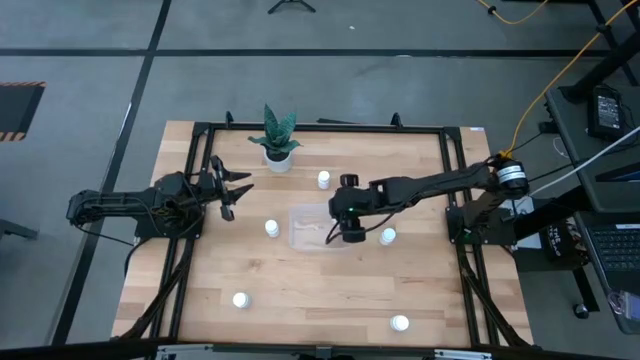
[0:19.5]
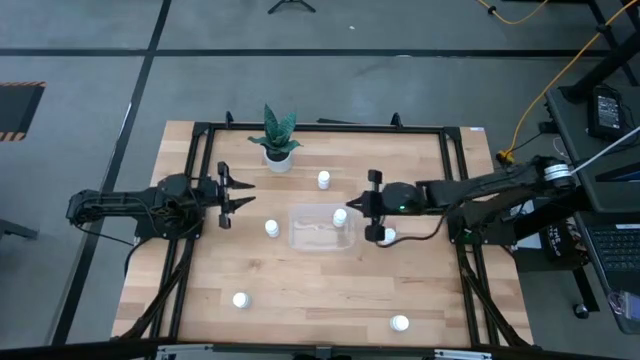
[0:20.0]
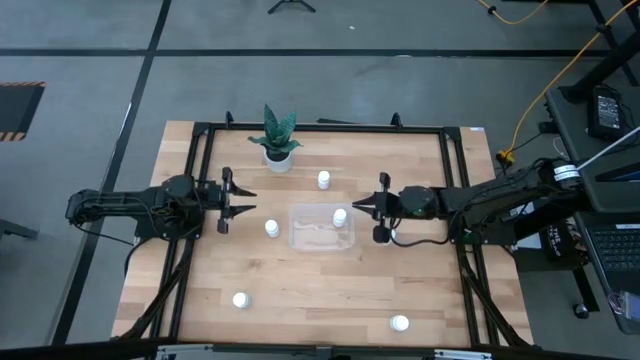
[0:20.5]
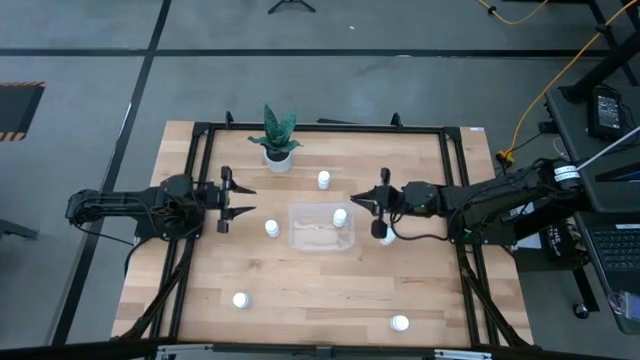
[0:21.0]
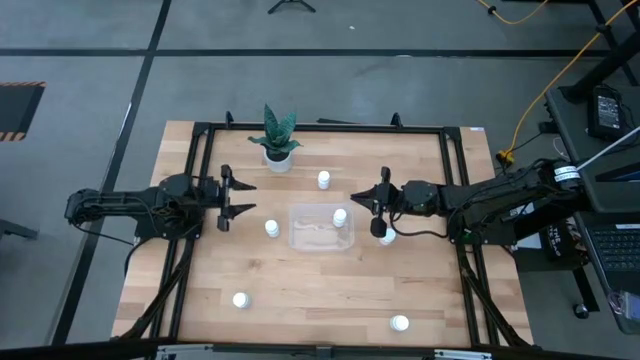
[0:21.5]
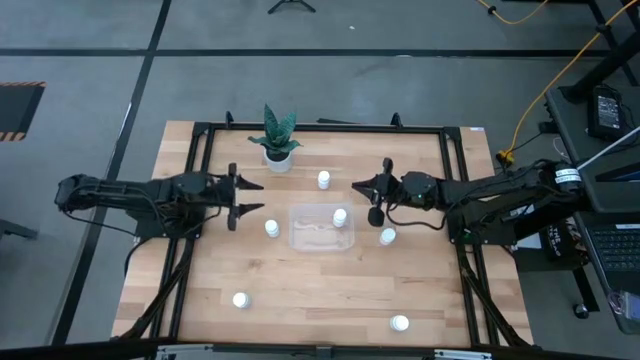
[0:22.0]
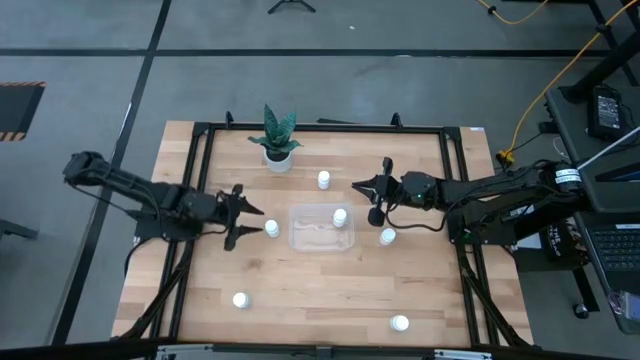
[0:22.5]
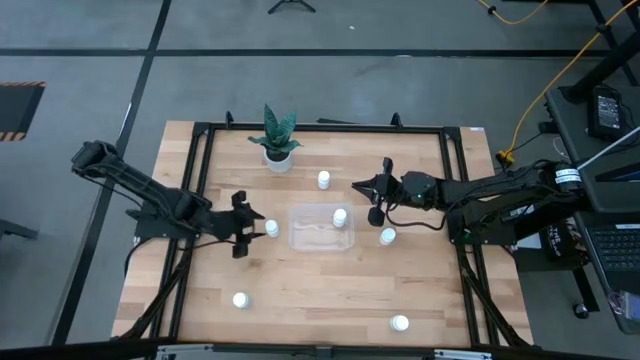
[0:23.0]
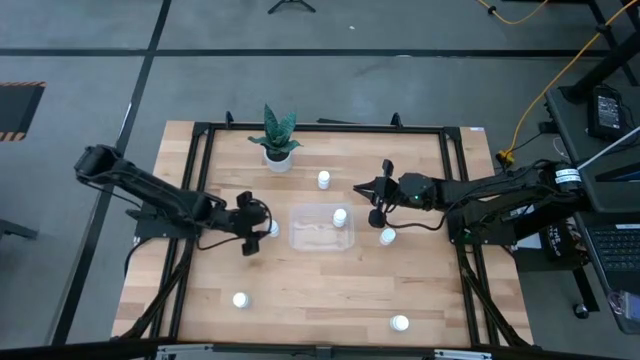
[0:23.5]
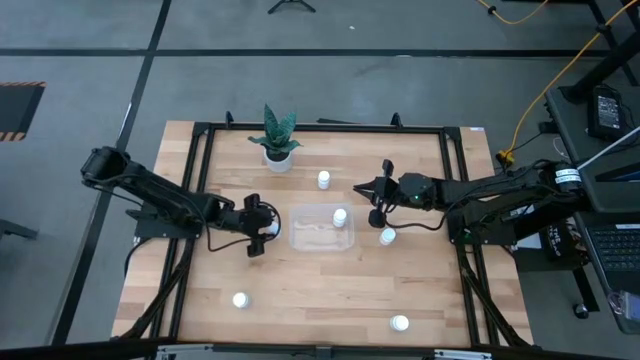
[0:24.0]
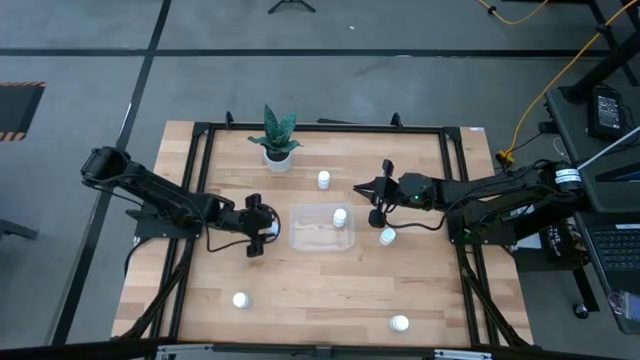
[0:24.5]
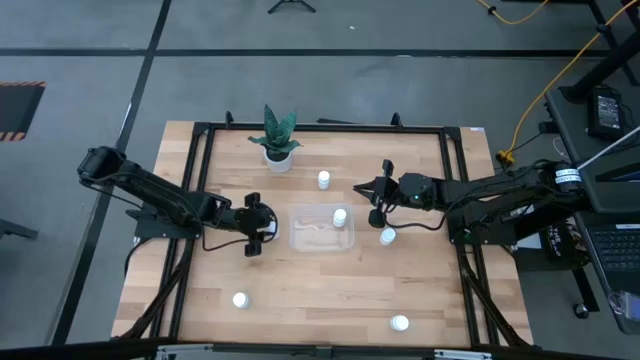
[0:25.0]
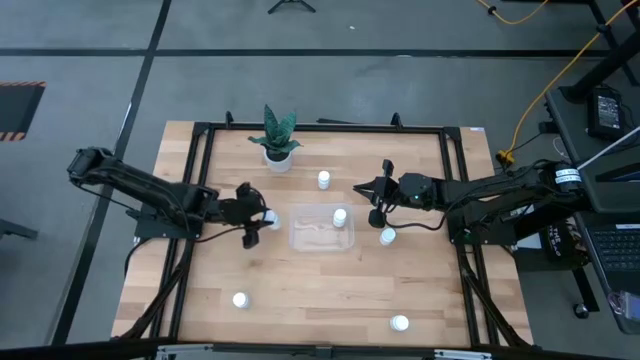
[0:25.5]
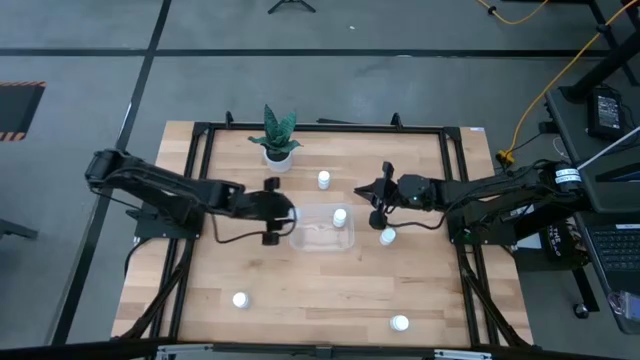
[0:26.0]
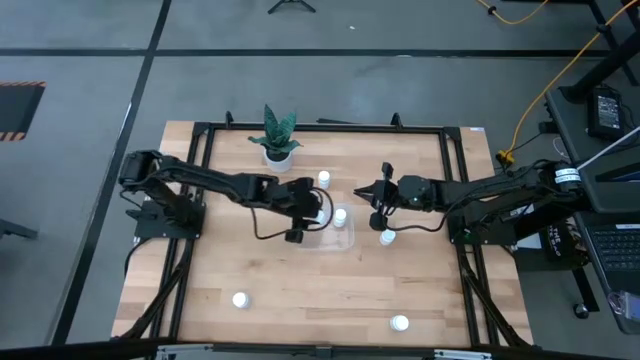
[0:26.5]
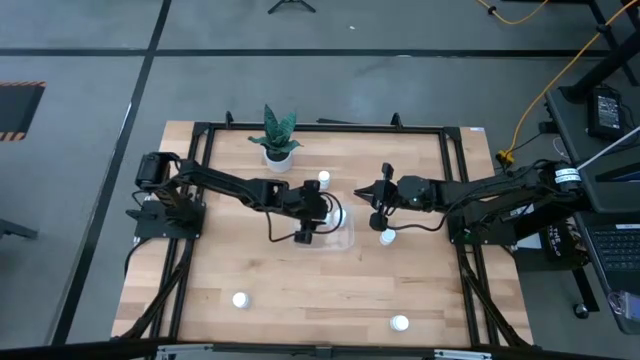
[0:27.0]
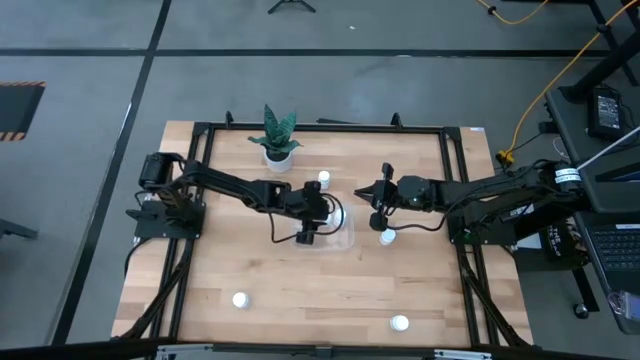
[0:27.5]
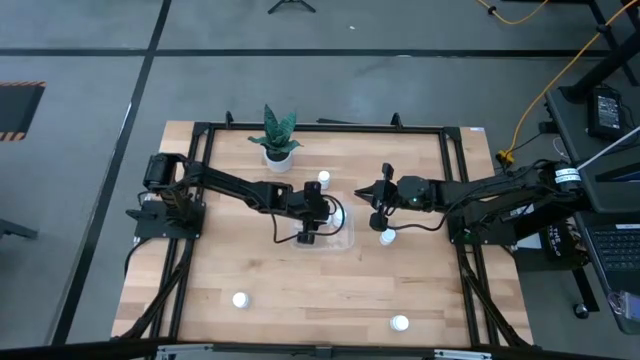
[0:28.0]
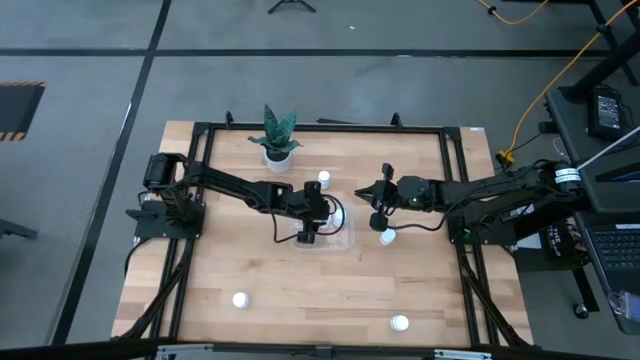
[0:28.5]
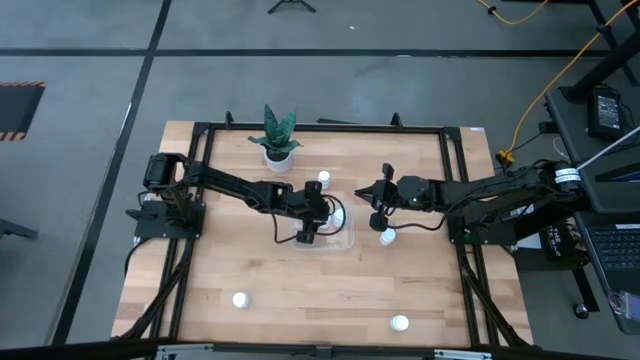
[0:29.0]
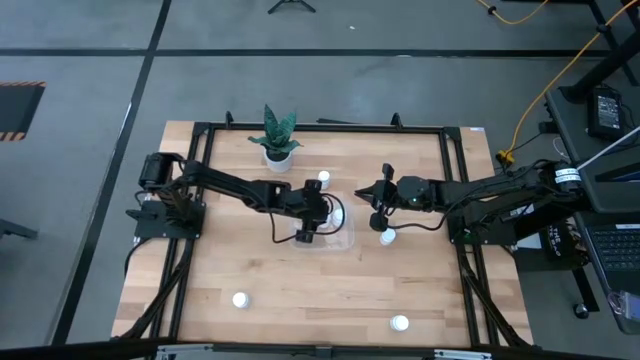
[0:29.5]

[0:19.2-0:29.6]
Task: Pick and place pill bottles into a basket
Put the white medicine bottle into the transparent bin

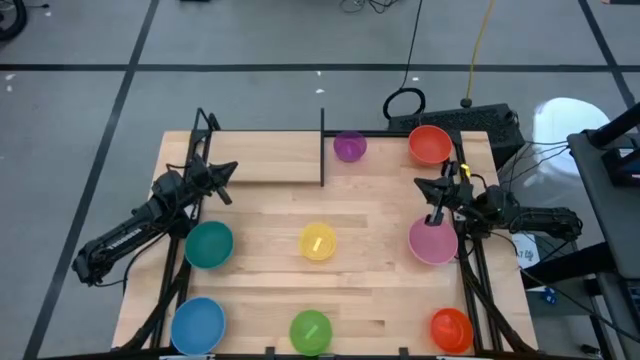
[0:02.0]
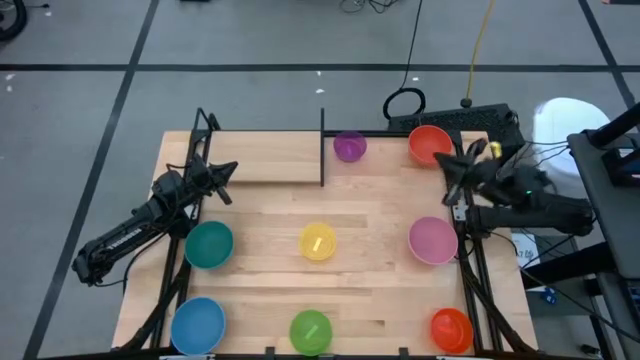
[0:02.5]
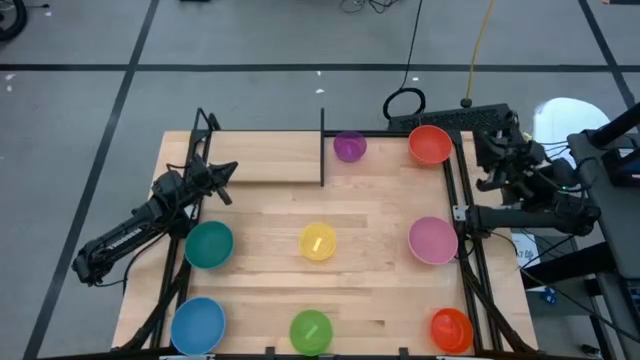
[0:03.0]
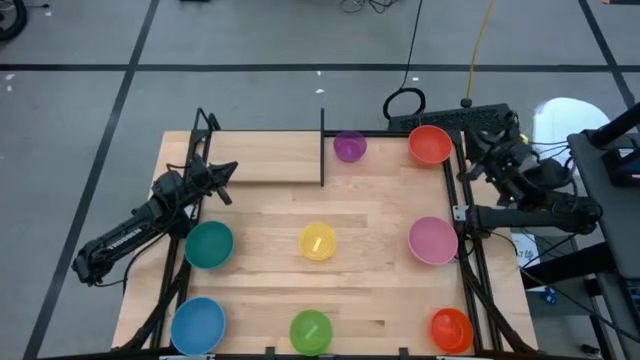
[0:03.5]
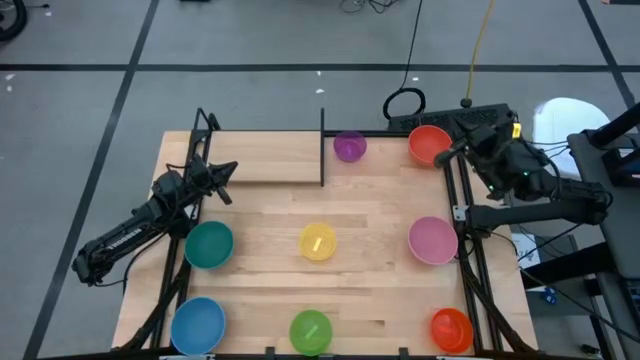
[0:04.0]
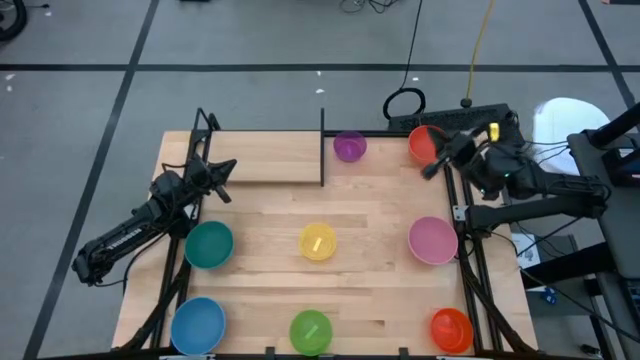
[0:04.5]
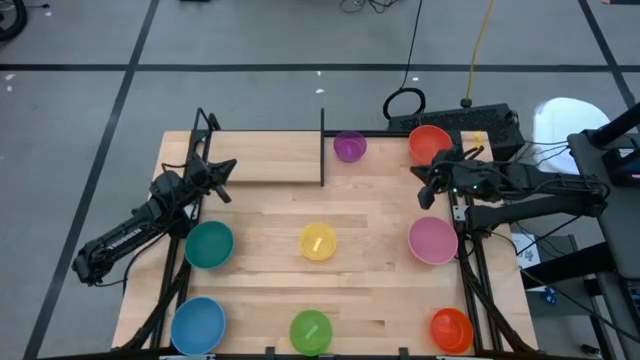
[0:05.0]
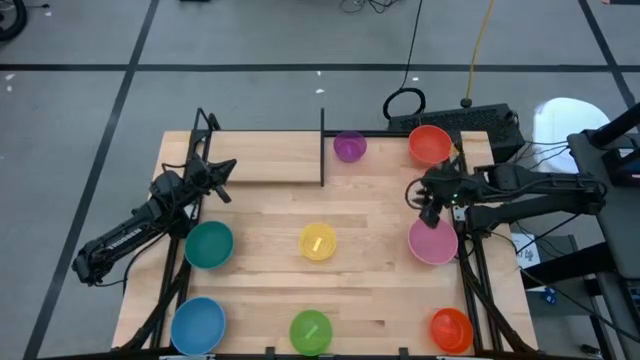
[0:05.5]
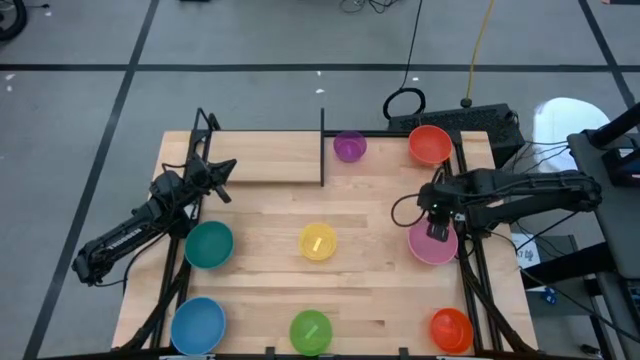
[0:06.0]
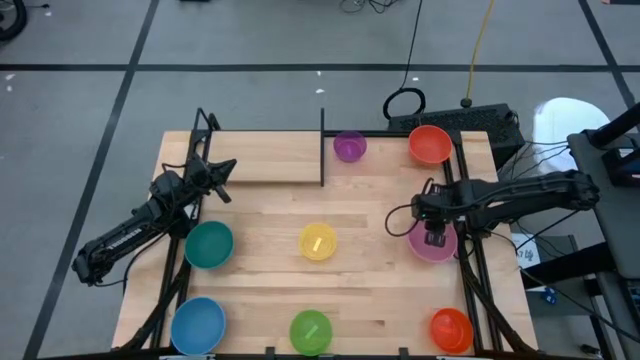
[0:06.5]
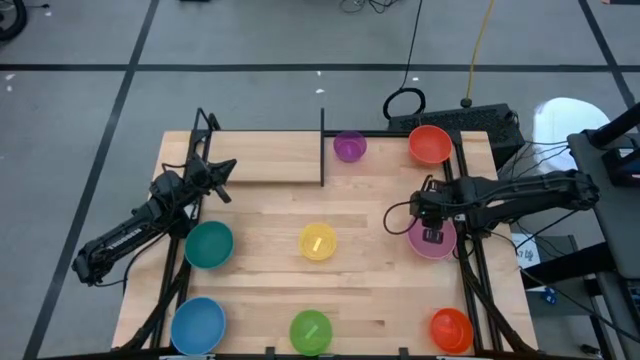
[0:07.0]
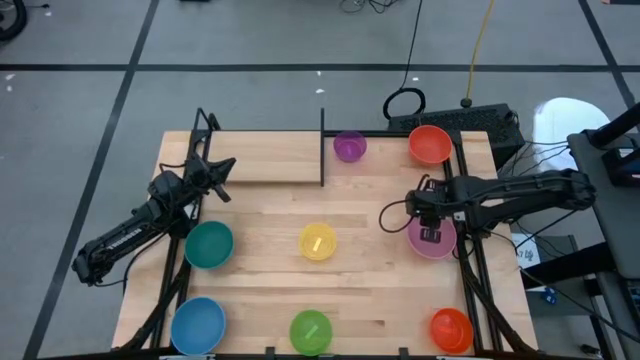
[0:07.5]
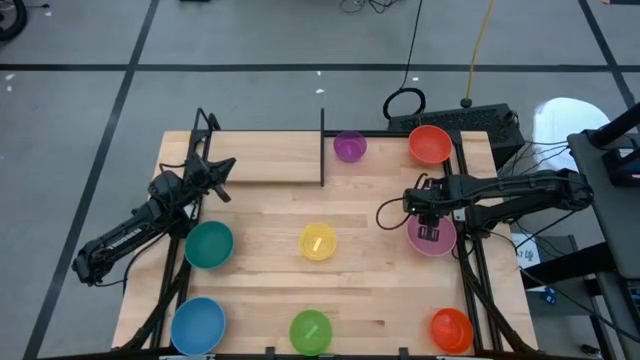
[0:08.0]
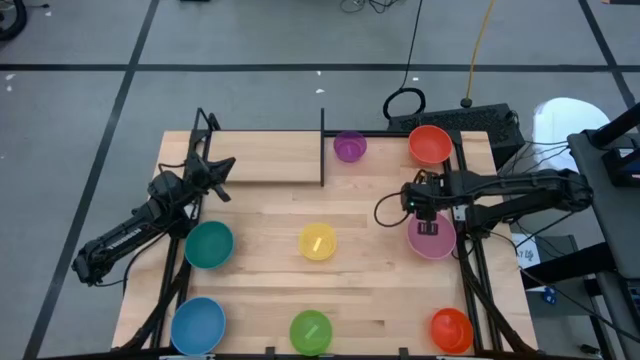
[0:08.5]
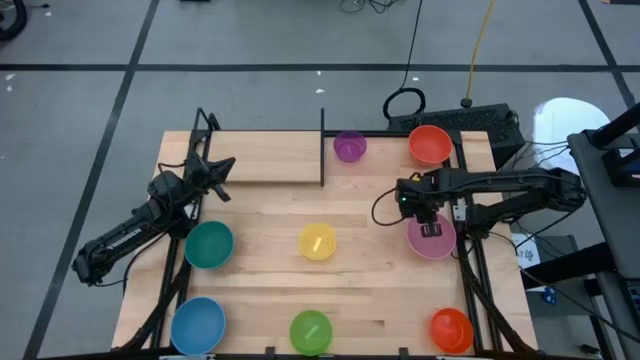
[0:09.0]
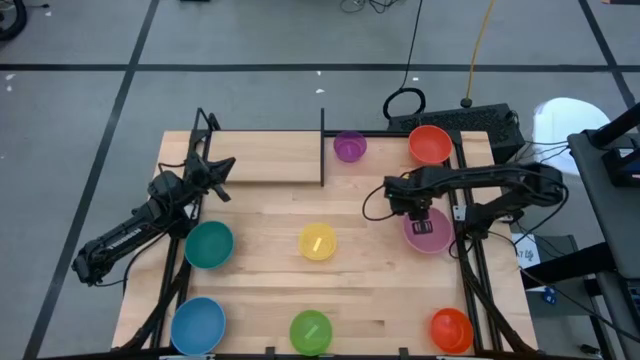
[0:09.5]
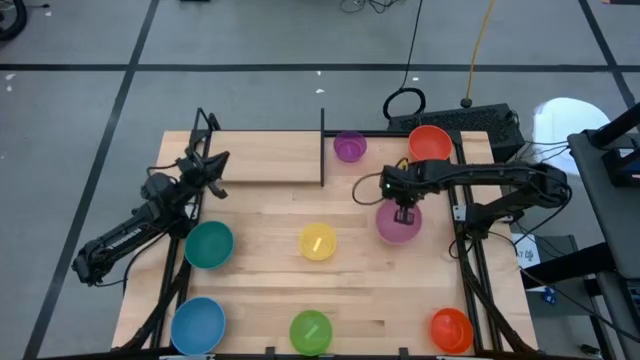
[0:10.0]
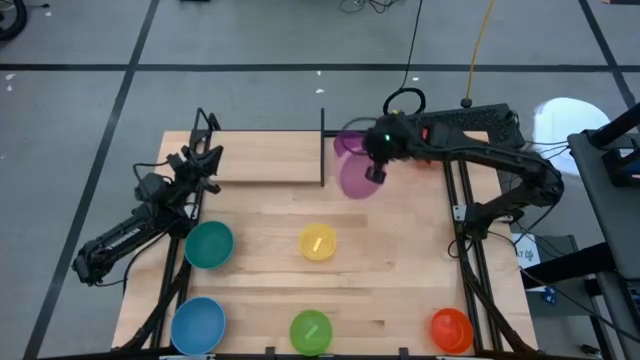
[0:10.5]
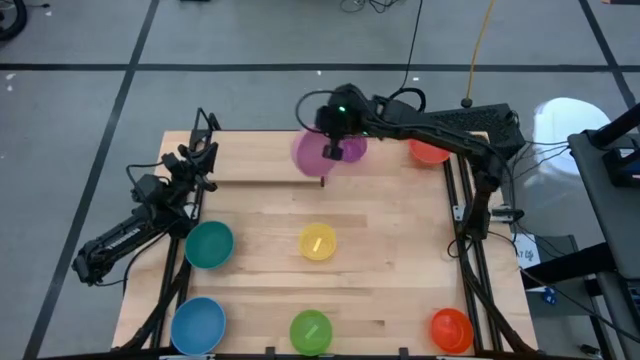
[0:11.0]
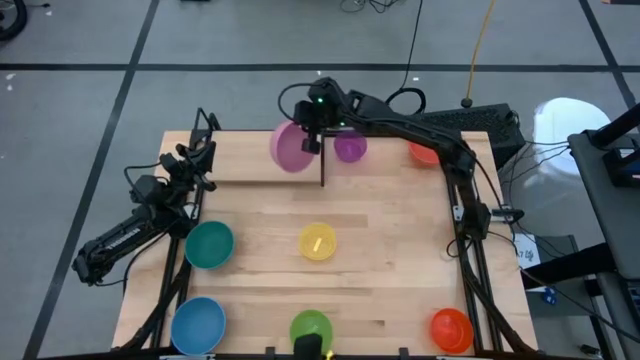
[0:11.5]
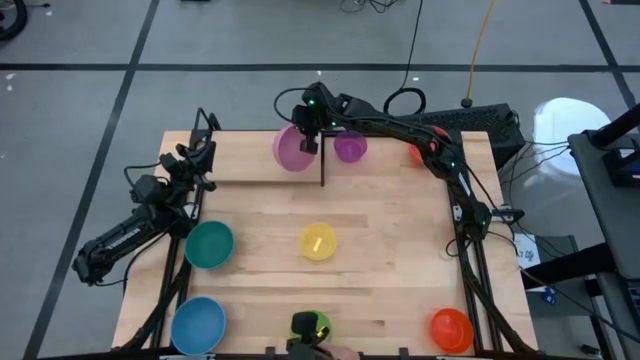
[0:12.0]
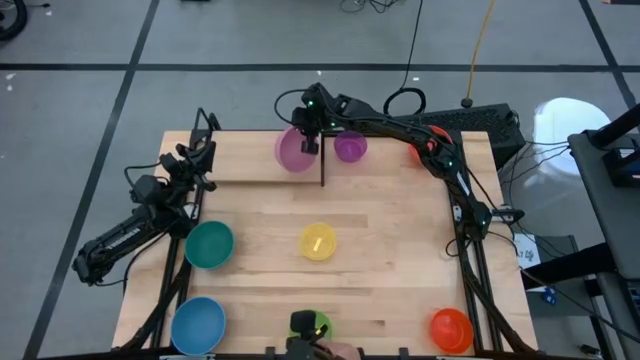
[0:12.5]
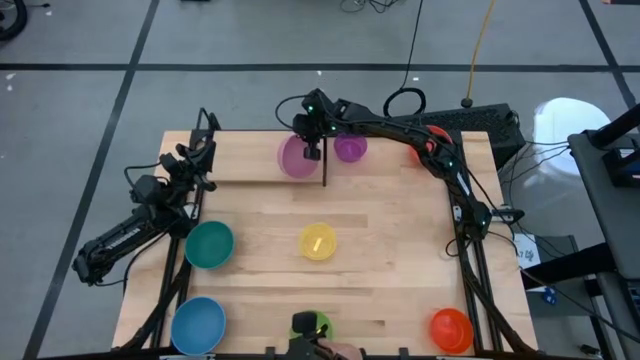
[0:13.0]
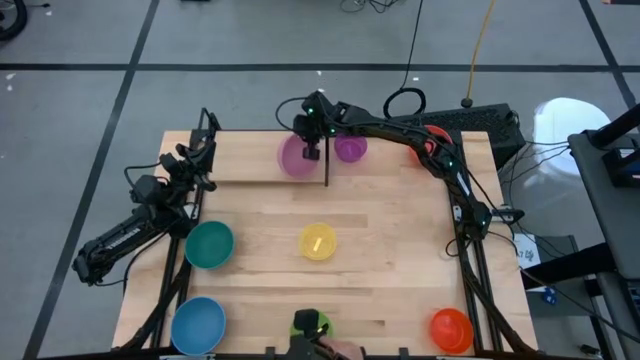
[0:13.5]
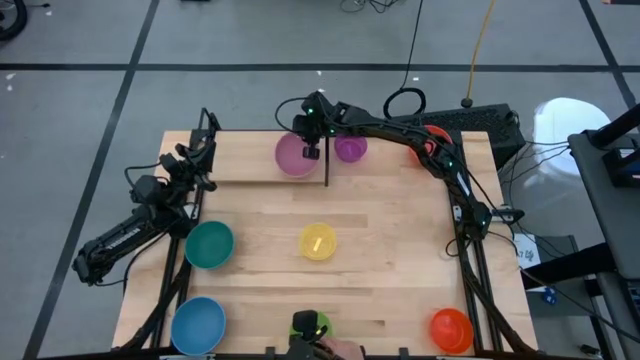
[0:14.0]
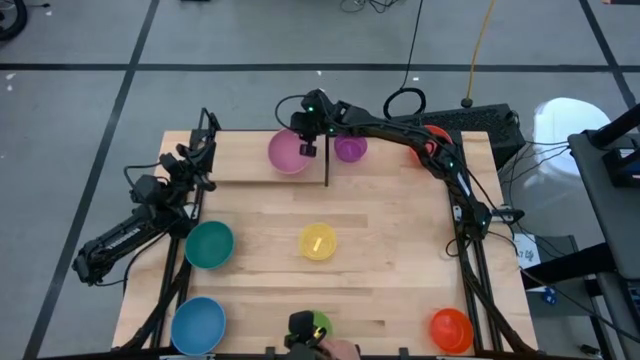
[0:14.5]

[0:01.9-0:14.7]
Task: Place and stack bowls onto a shelf
Put the big pink bowl on the shelf
